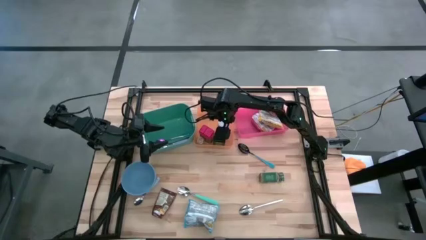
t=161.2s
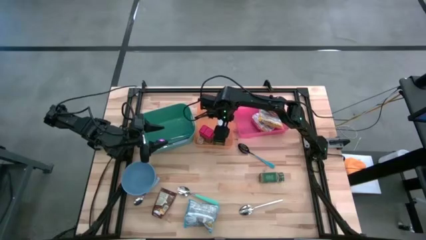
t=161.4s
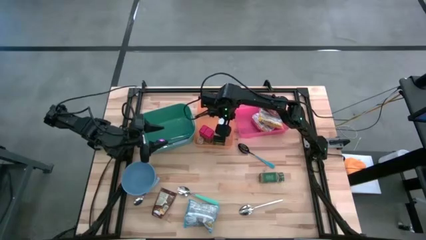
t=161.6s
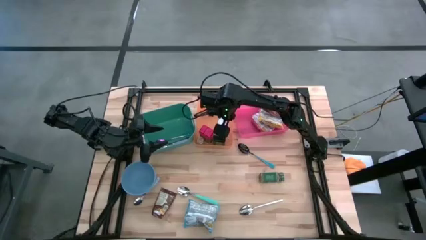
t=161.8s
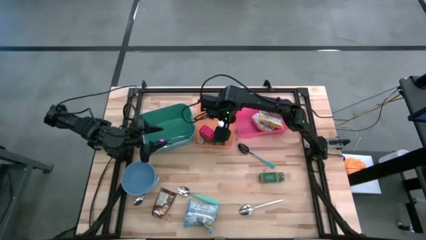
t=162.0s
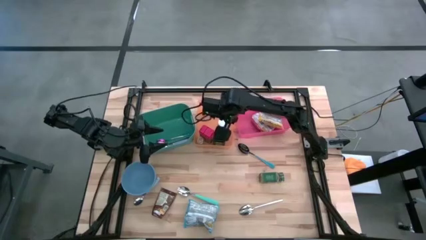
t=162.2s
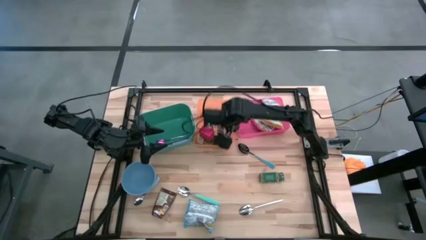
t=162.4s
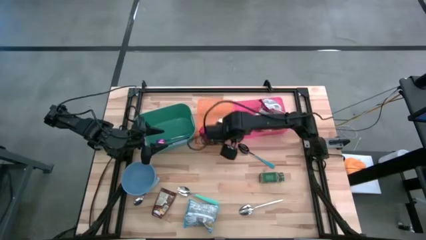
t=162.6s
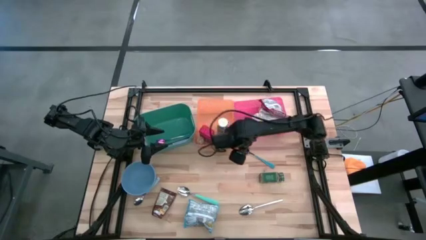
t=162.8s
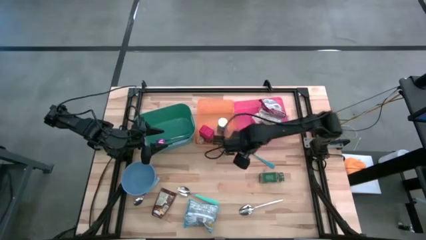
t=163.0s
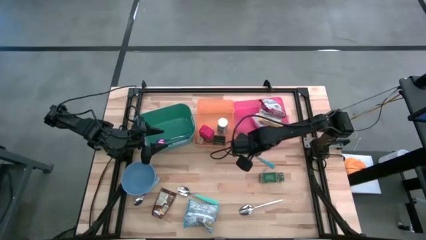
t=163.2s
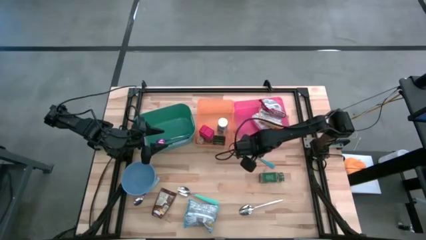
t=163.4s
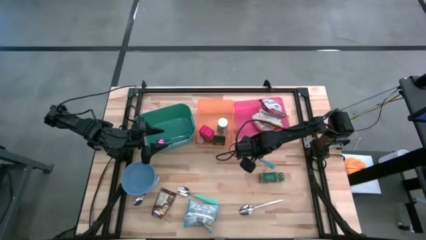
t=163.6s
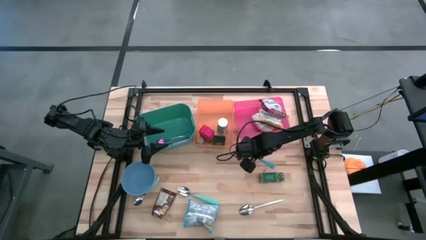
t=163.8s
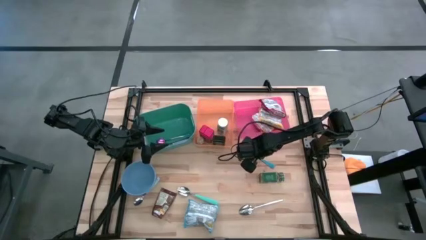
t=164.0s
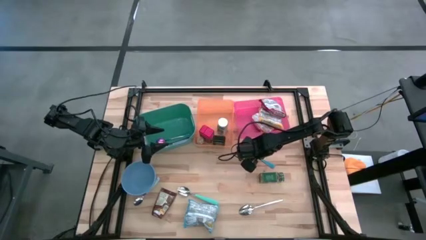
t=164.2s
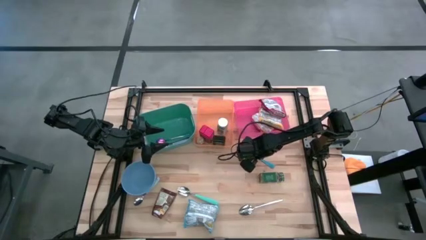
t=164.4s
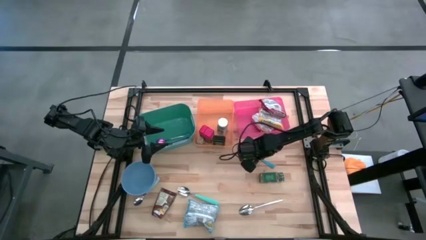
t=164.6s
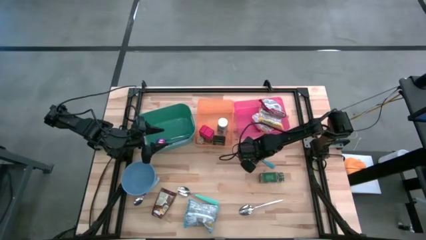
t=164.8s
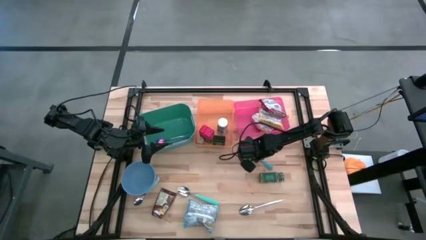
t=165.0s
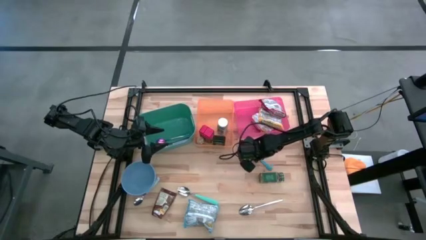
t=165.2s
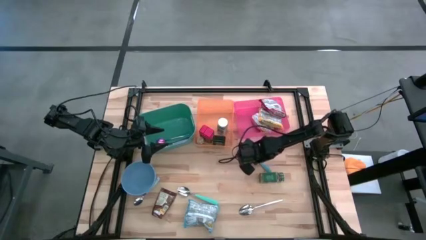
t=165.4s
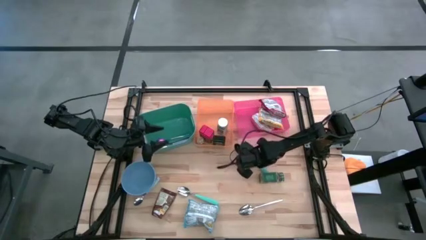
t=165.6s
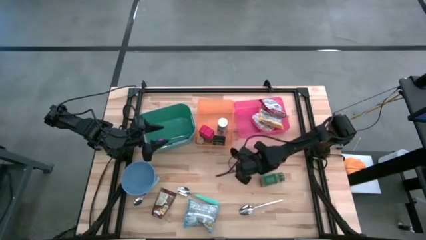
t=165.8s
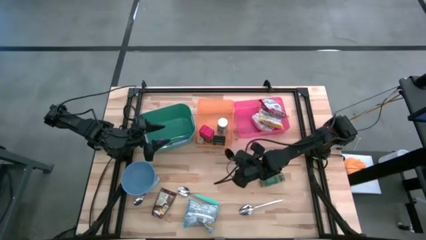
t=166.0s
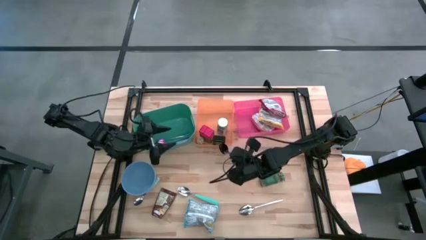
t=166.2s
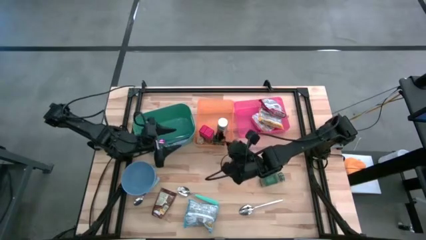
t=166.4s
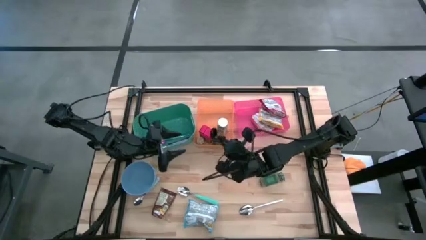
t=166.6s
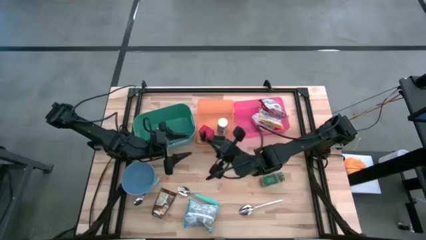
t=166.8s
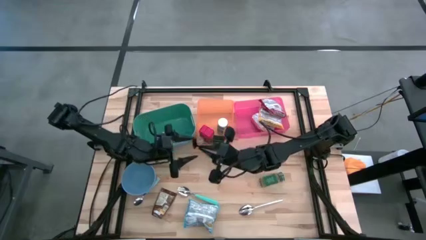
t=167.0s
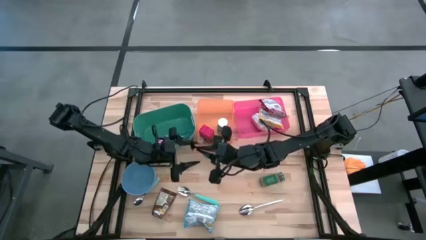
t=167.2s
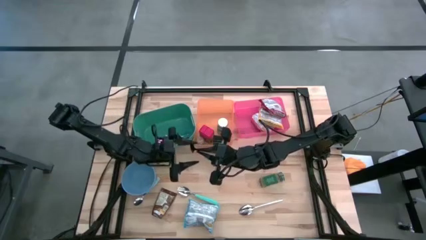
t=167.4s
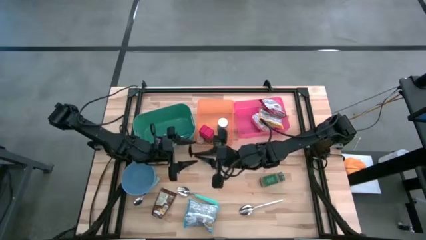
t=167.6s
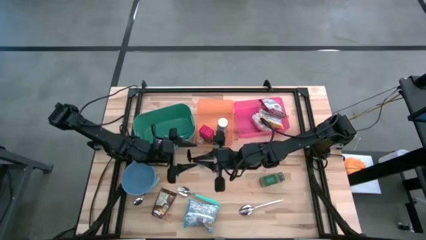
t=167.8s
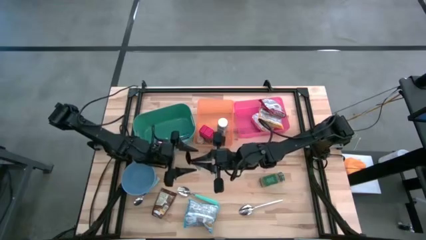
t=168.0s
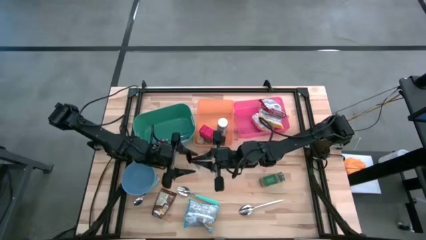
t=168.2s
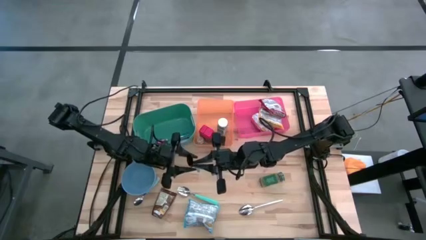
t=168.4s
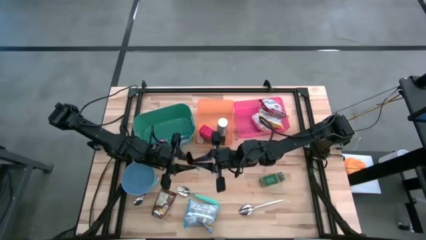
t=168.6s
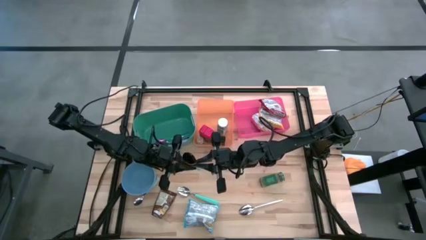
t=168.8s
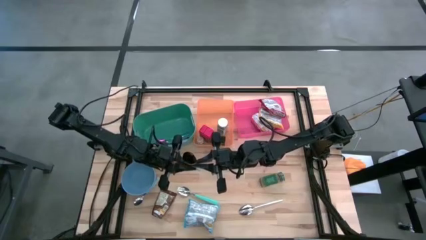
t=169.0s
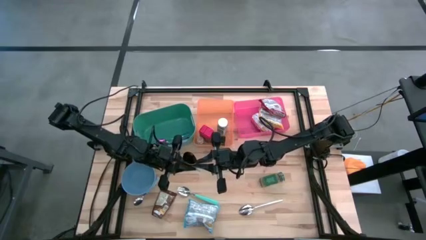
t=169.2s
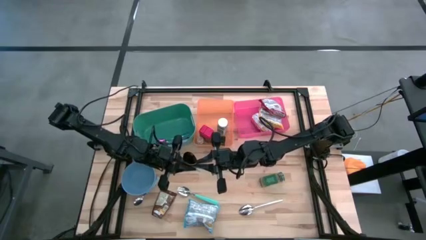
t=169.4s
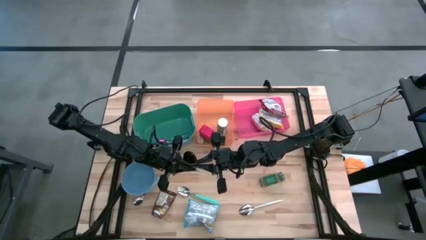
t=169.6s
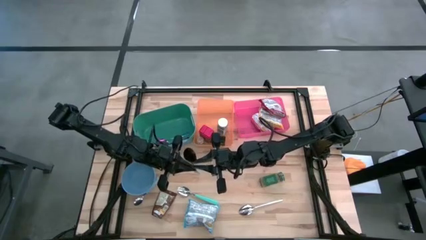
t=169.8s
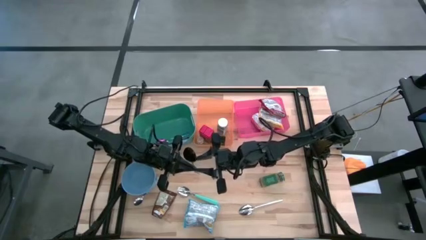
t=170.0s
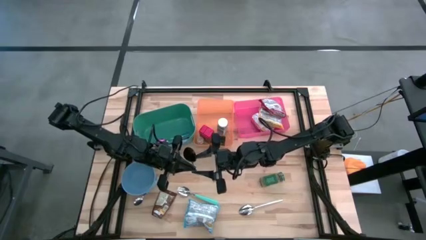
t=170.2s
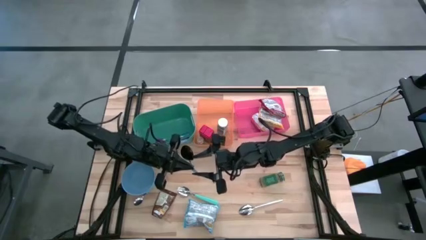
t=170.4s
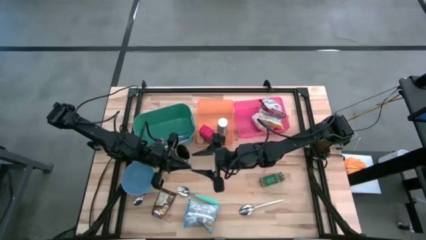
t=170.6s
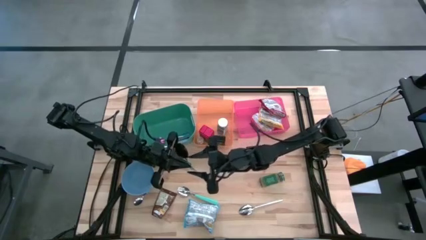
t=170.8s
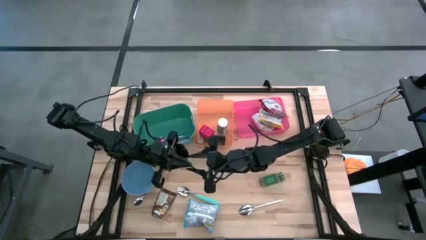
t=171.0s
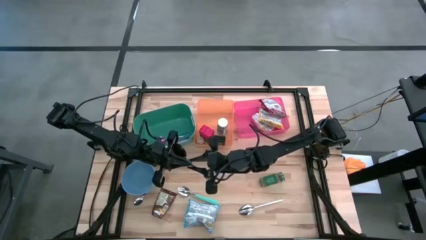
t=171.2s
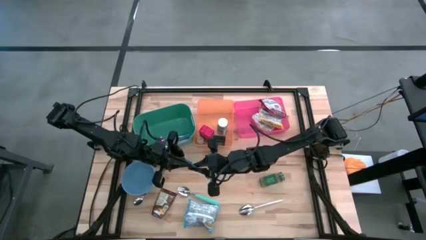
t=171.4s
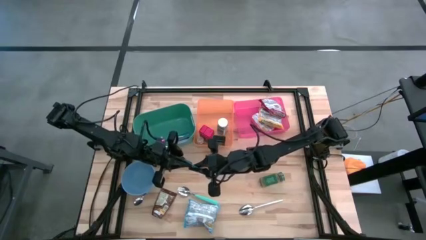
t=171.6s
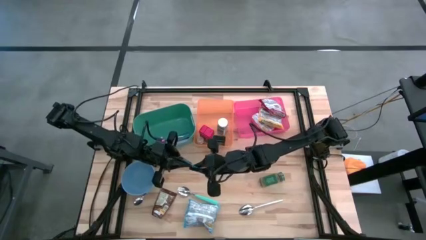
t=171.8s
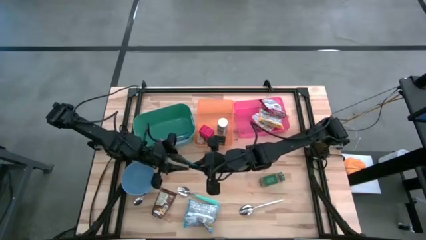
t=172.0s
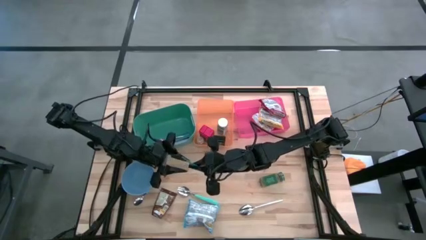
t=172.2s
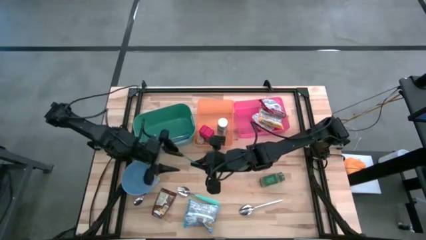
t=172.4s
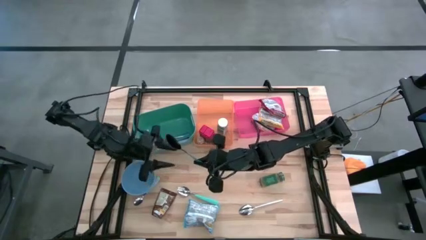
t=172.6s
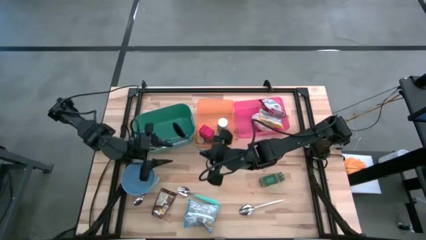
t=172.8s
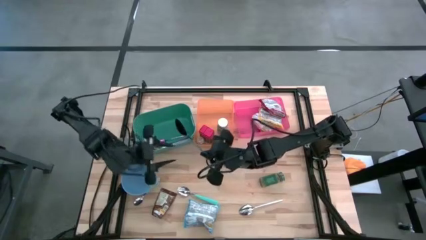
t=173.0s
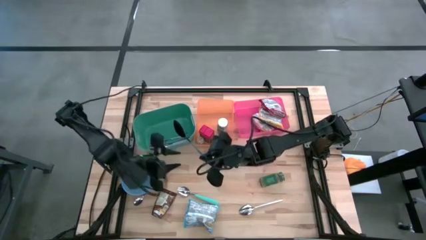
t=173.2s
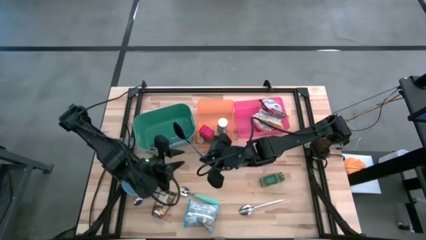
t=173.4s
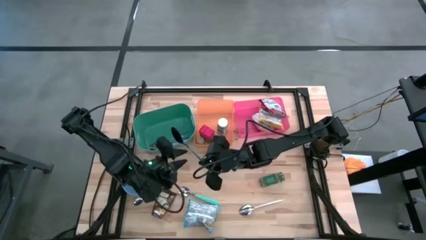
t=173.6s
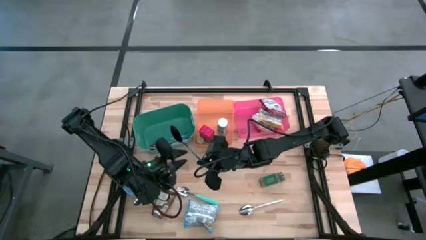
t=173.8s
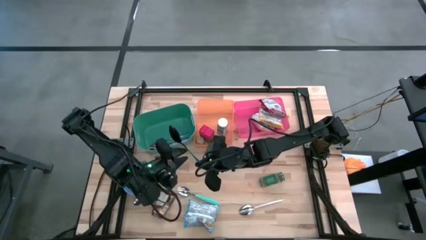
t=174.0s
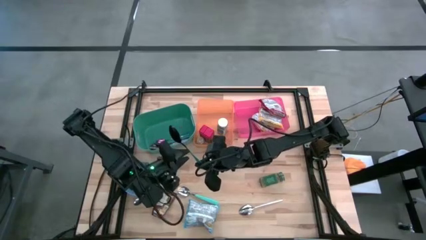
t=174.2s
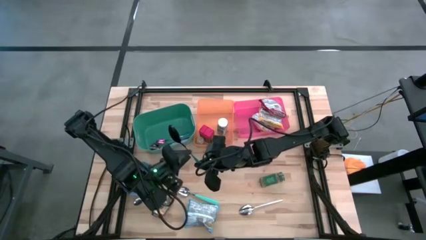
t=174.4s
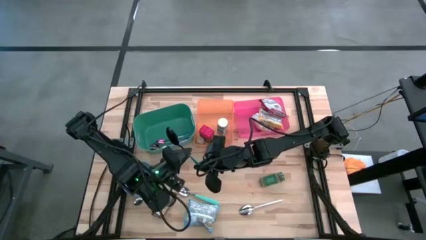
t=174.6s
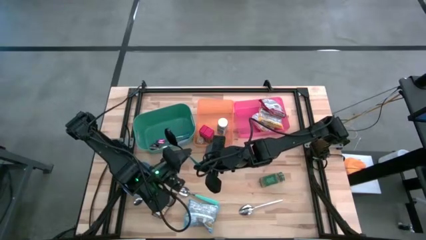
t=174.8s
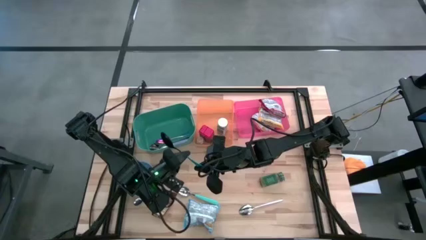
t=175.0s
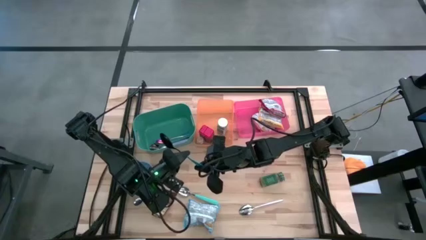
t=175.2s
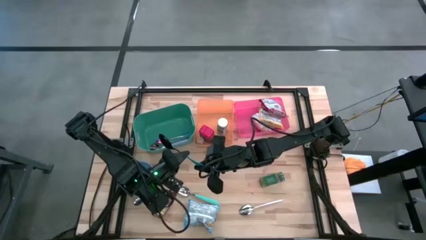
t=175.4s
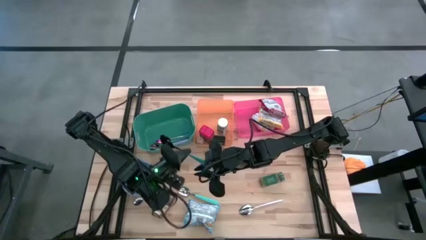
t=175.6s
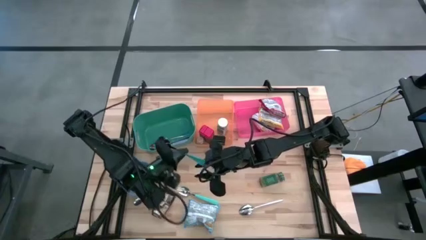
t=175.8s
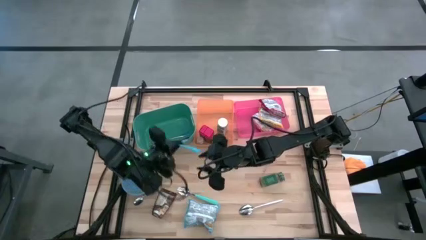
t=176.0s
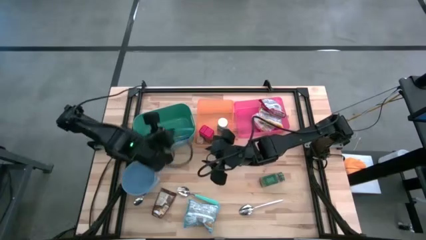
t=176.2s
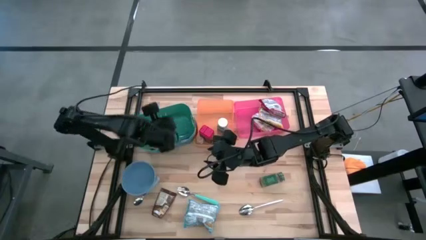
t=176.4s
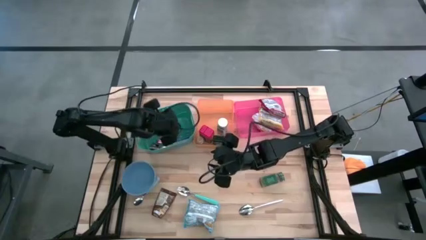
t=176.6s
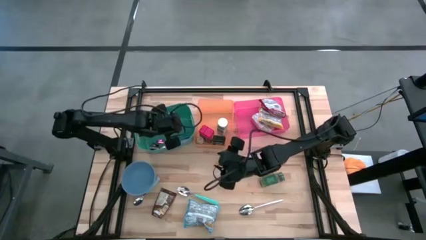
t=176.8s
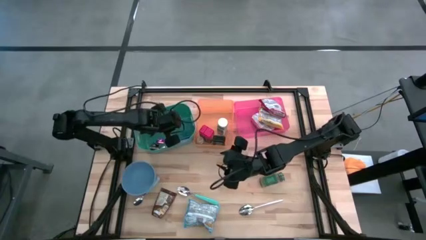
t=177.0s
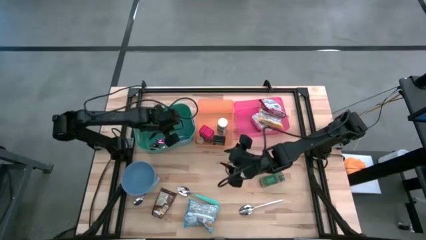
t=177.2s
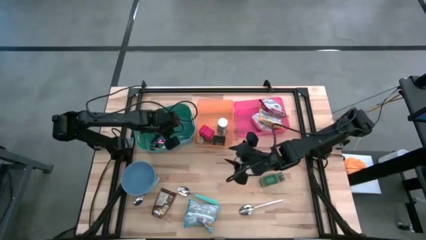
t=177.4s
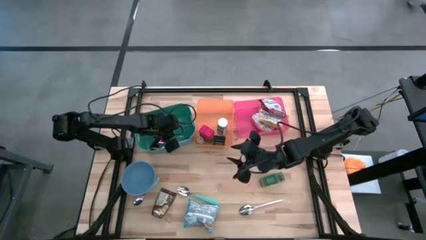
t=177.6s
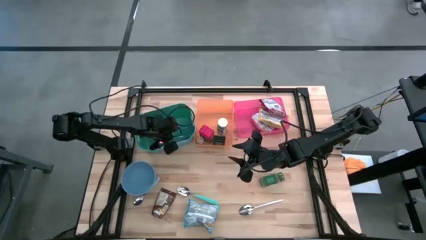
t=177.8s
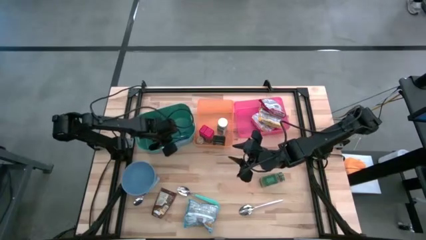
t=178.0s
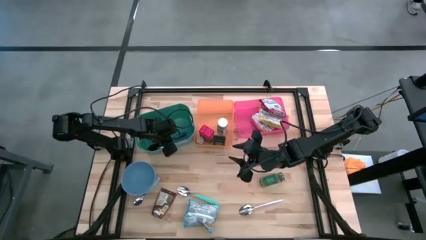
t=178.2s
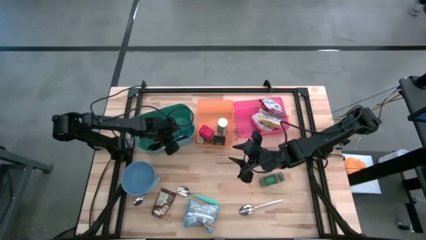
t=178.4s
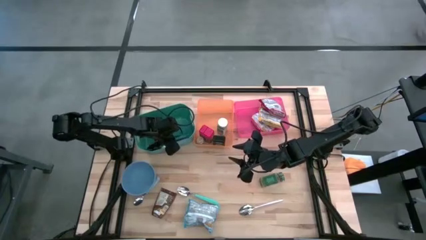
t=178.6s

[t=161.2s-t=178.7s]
Put the black spoon into the green bin
